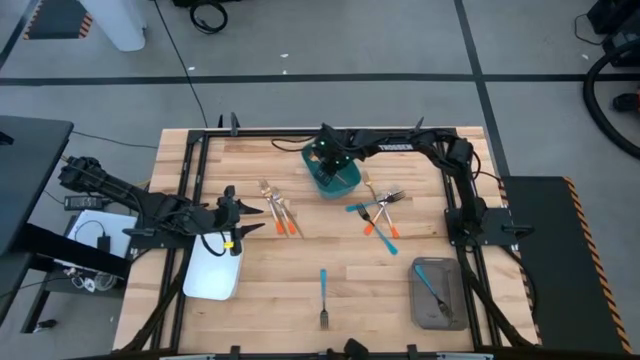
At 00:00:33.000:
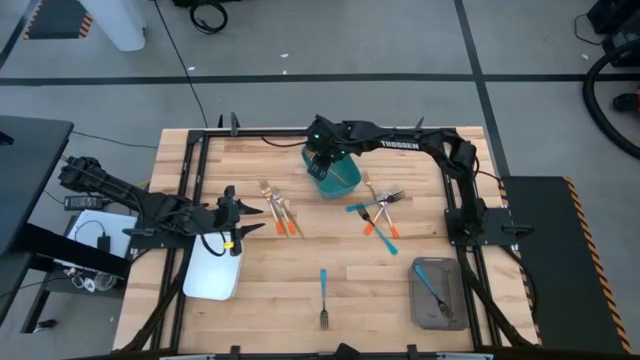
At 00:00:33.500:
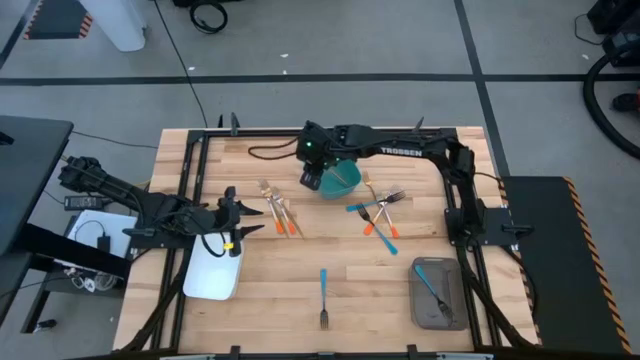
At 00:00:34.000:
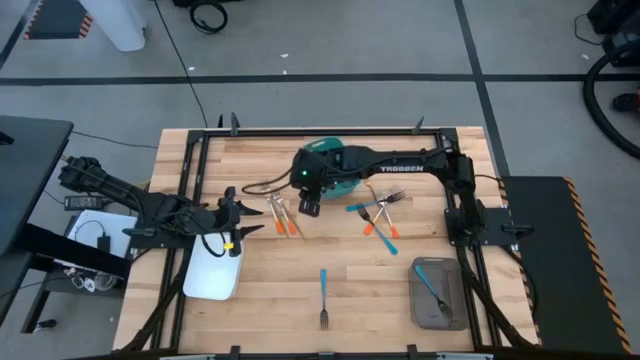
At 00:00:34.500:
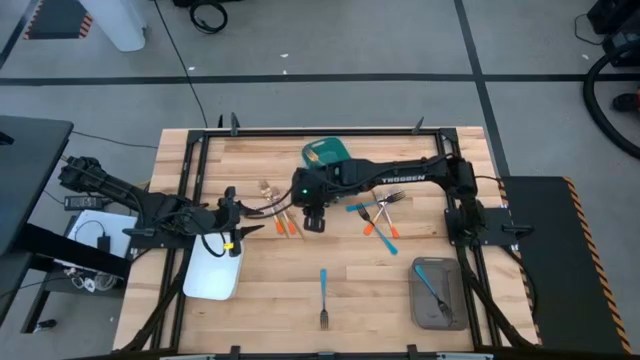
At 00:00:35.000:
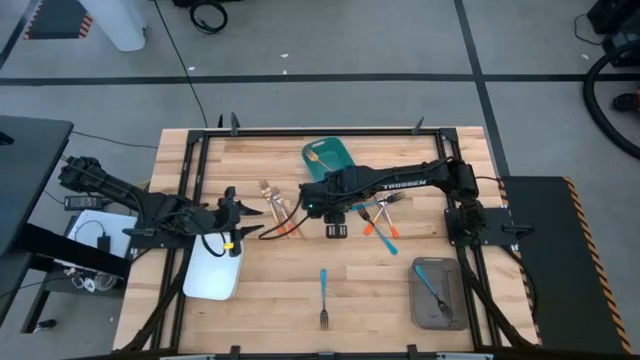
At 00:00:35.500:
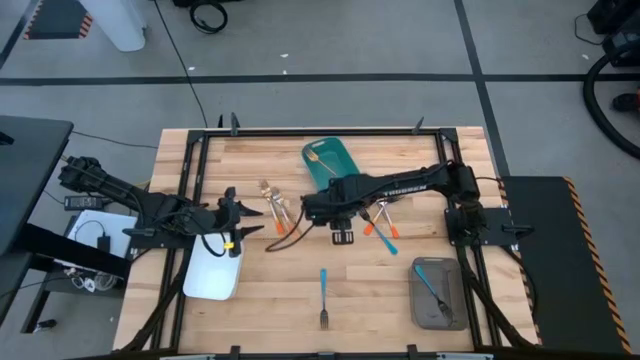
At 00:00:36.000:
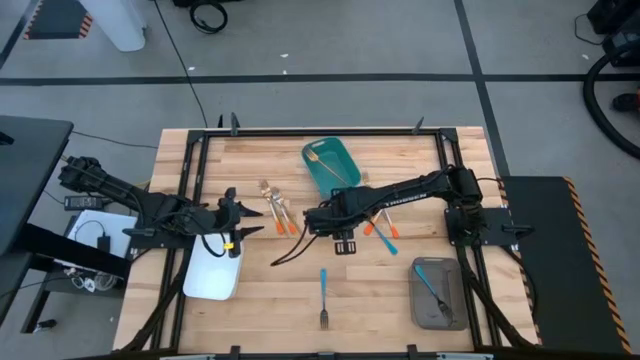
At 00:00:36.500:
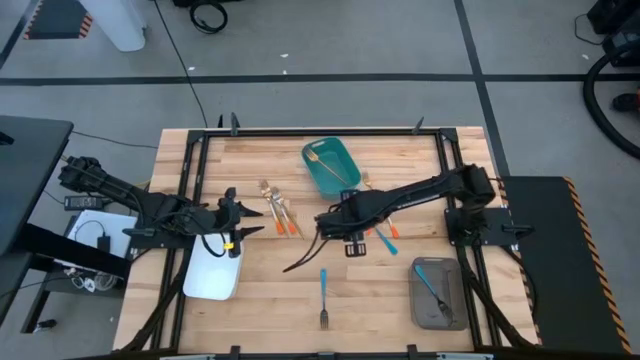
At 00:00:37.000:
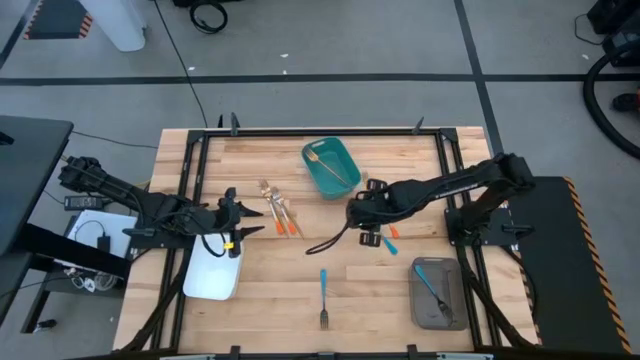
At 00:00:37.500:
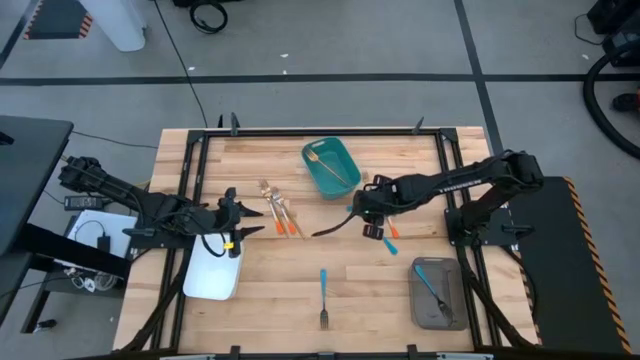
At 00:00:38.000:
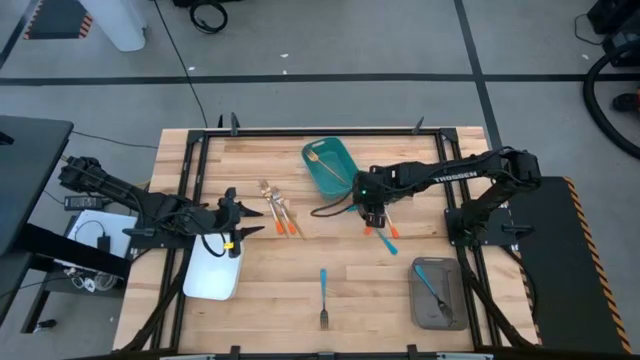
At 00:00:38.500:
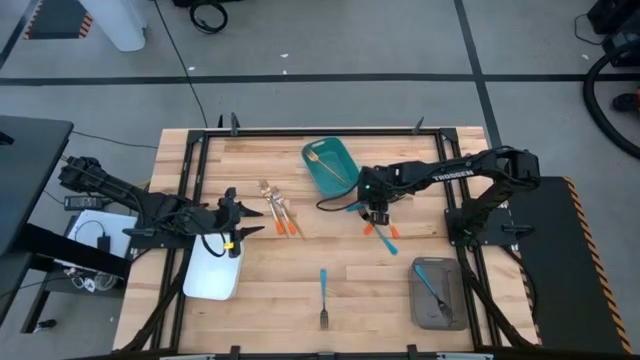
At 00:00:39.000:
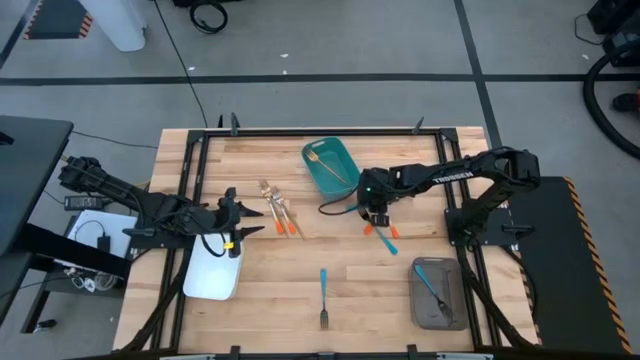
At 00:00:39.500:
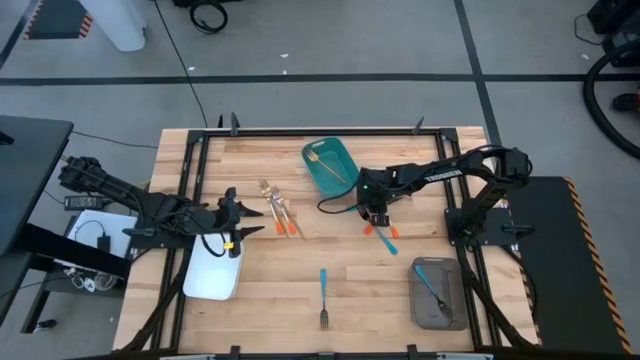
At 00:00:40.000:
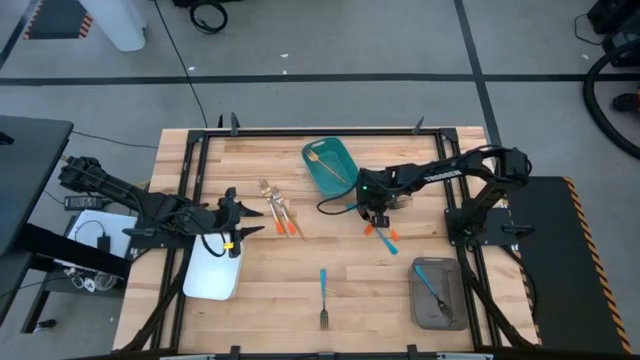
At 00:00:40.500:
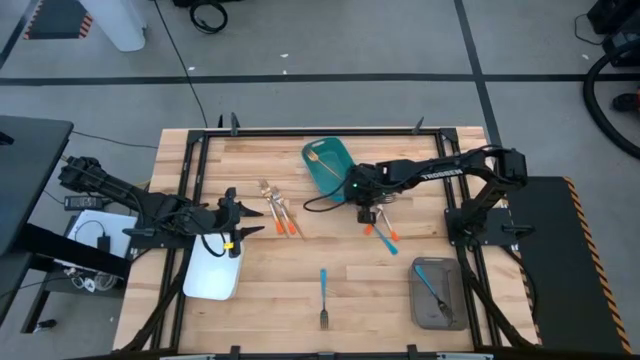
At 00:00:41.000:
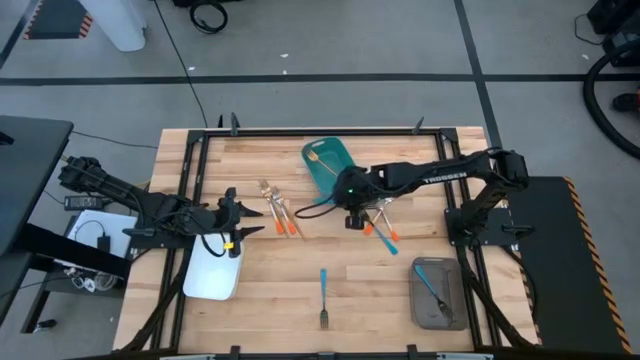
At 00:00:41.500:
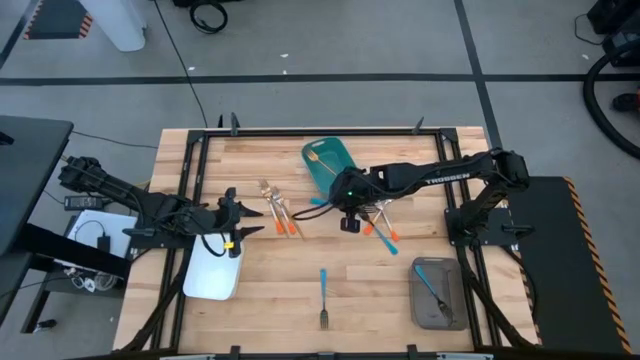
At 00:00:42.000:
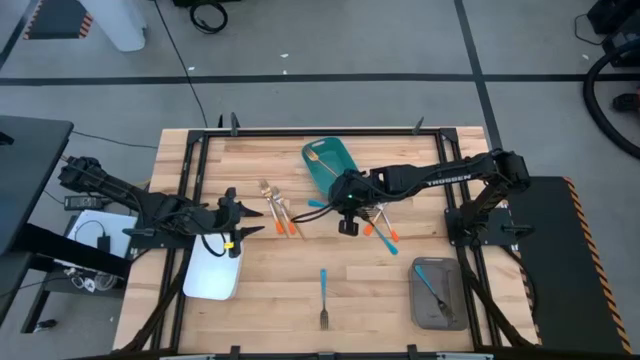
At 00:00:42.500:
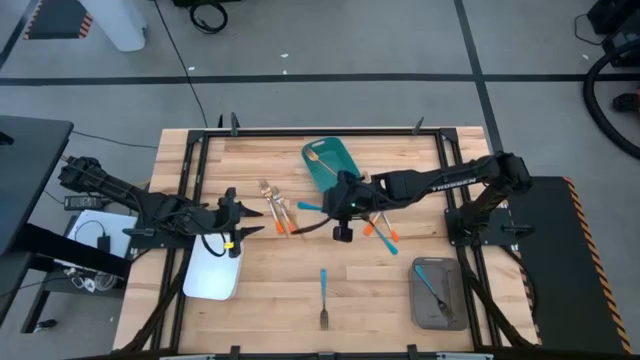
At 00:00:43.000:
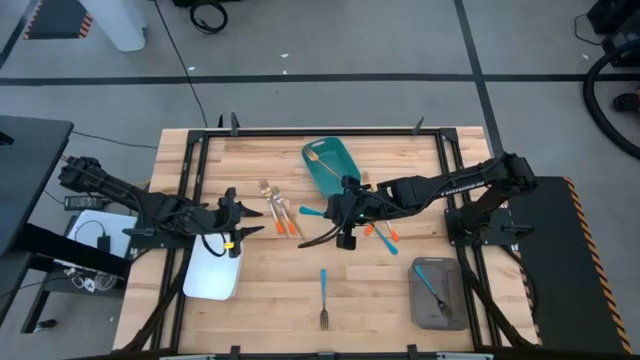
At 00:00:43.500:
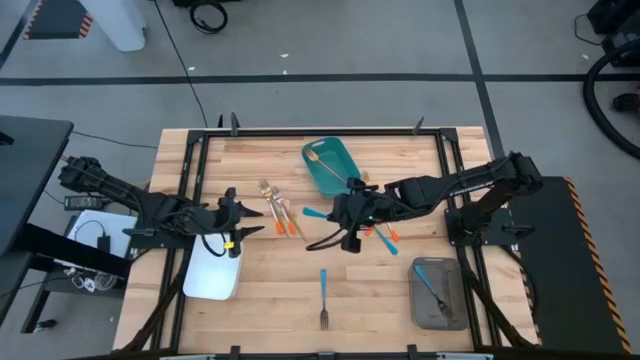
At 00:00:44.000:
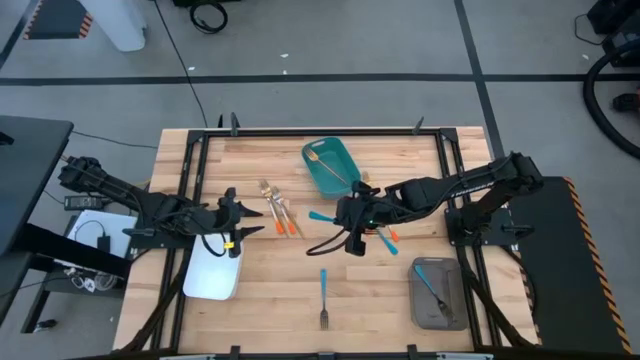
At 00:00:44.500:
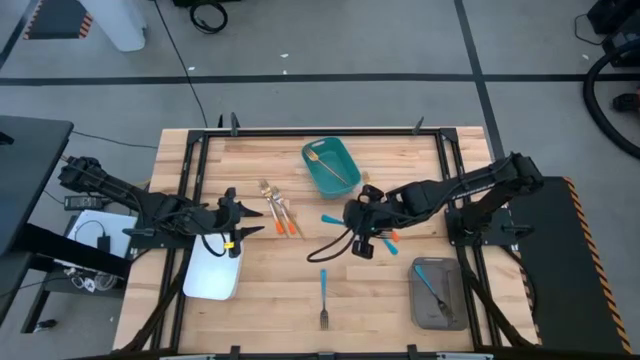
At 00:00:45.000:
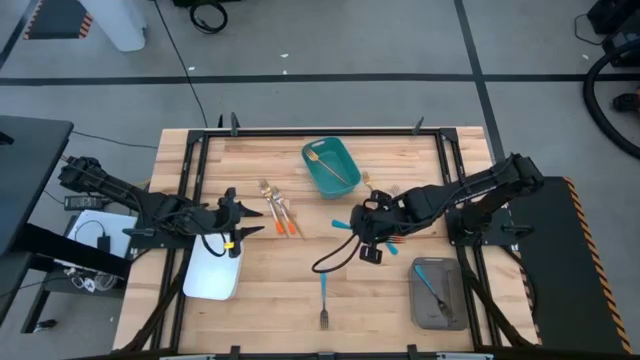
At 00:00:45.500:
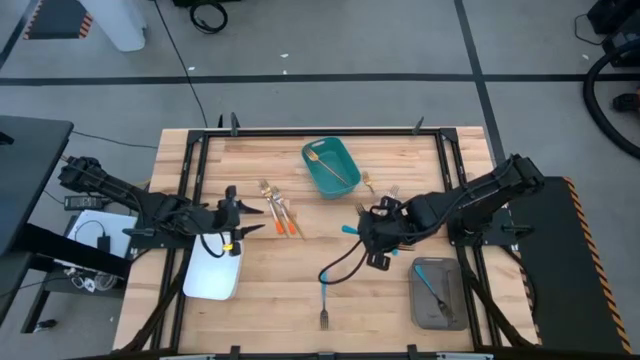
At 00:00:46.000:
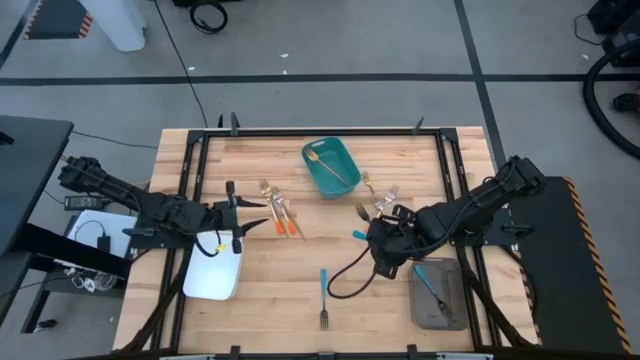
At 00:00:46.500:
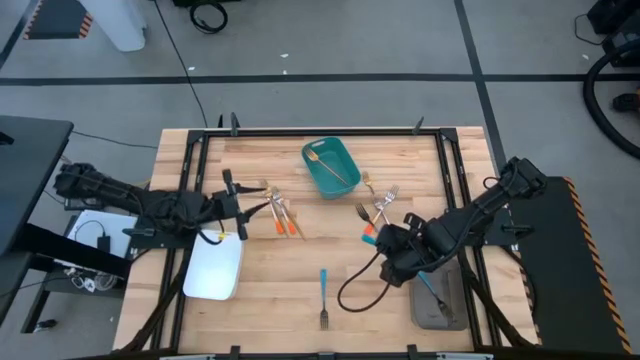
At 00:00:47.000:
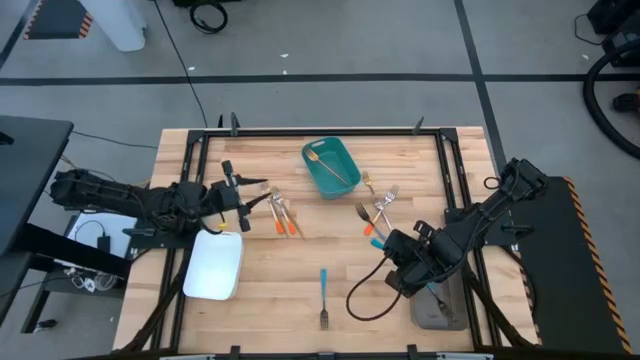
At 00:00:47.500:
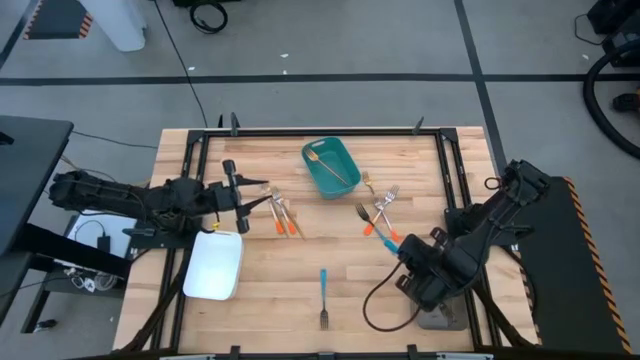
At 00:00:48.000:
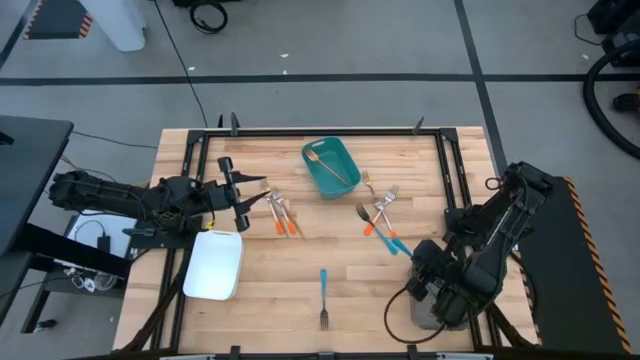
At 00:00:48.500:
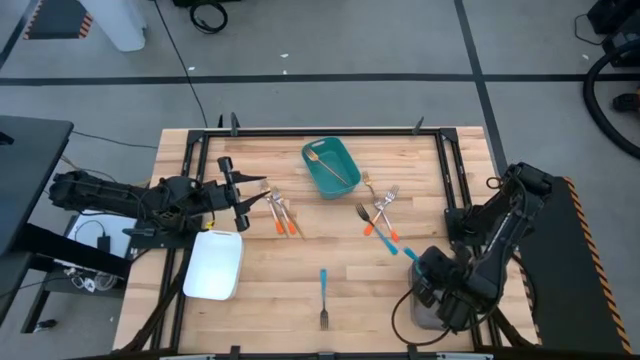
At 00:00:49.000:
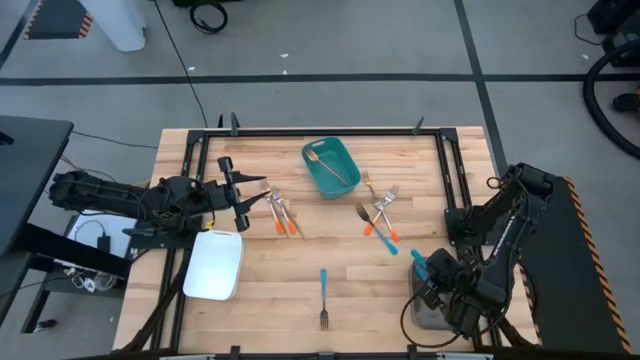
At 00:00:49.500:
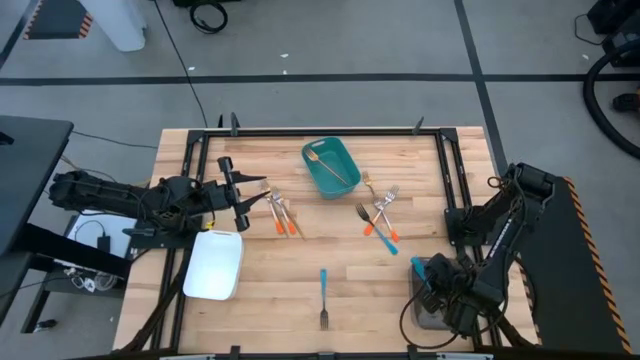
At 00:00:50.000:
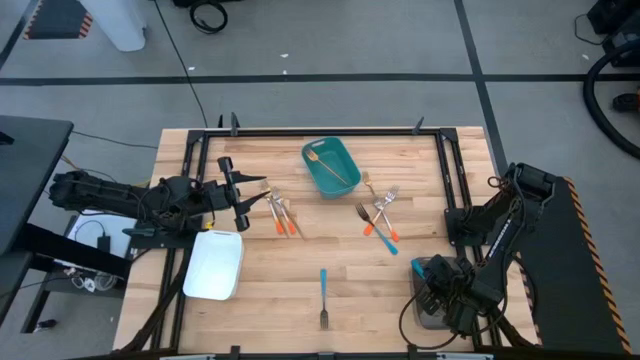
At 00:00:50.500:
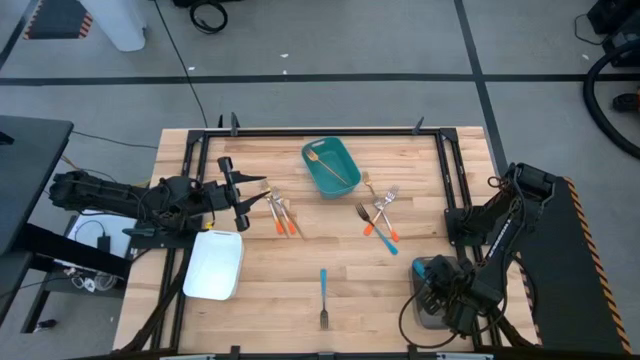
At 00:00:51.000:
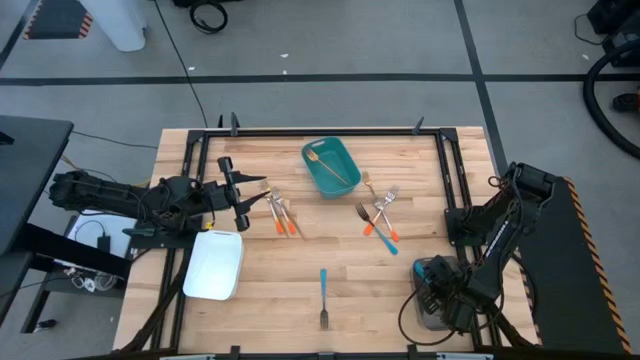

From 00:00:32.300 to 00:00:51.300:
Task: Sort silverware by color (type)
Put the blue fork into the black bin
